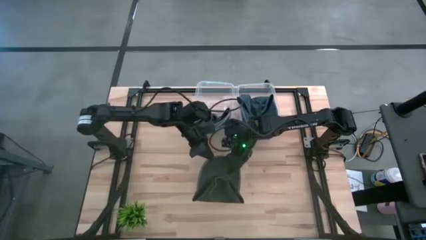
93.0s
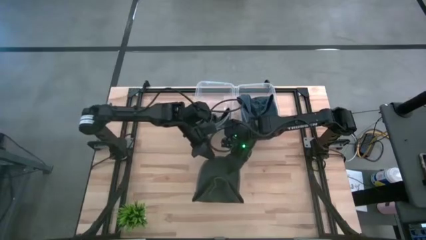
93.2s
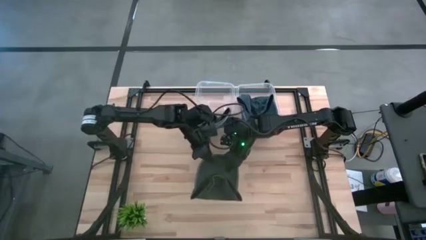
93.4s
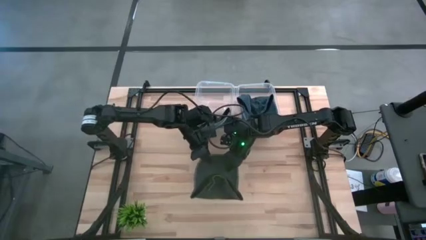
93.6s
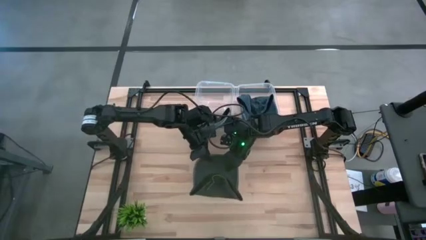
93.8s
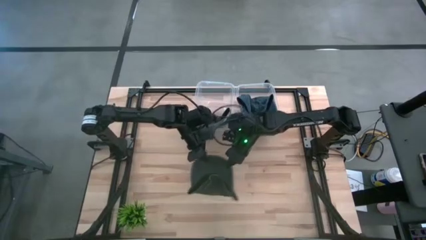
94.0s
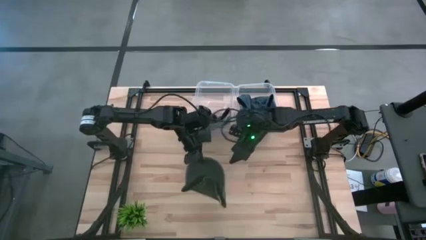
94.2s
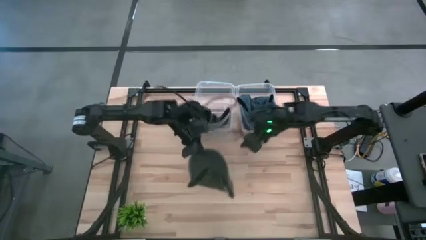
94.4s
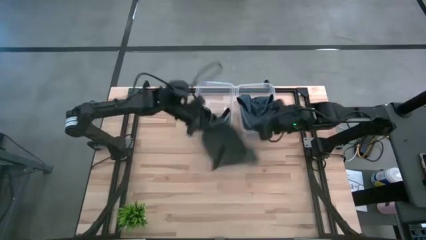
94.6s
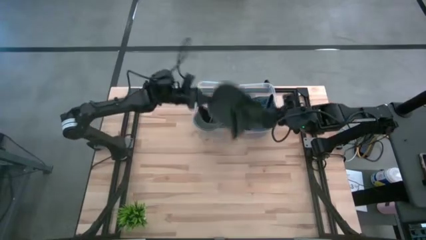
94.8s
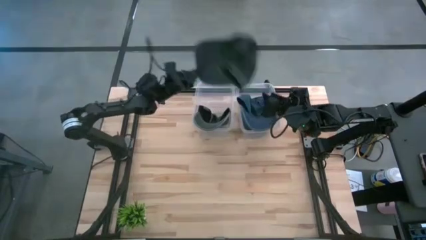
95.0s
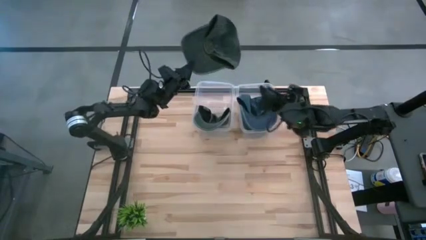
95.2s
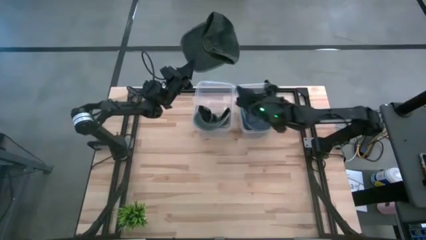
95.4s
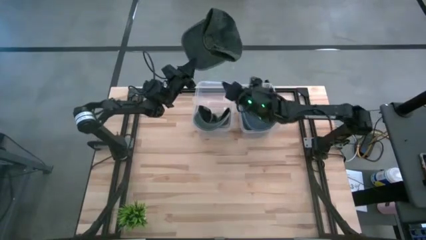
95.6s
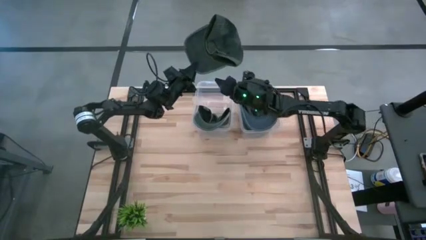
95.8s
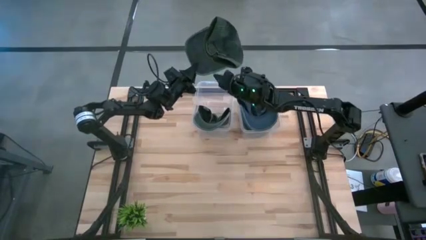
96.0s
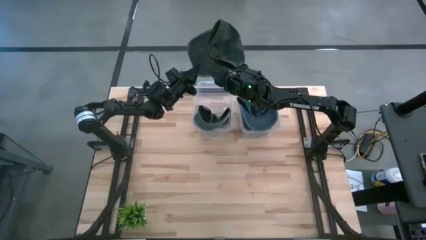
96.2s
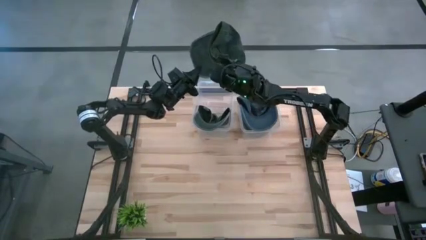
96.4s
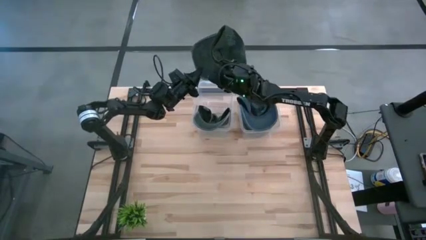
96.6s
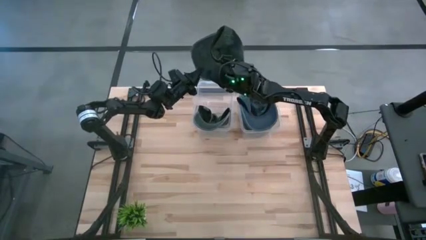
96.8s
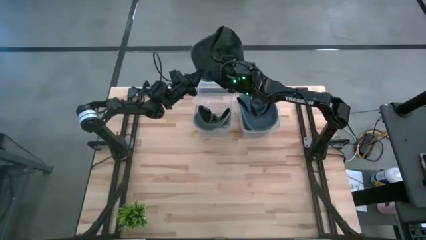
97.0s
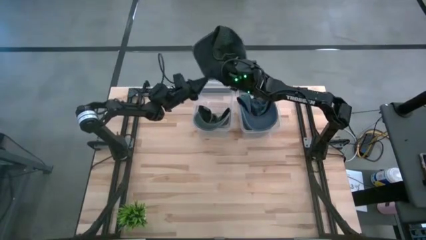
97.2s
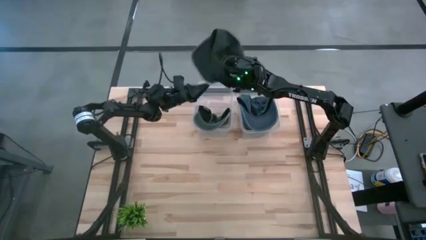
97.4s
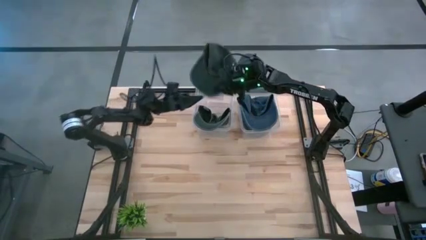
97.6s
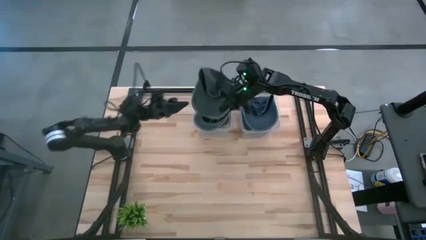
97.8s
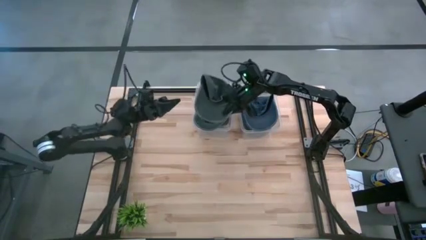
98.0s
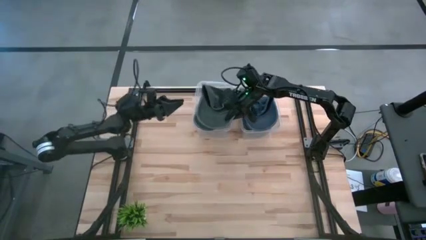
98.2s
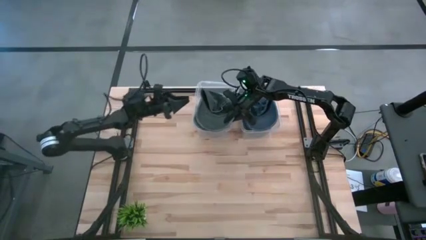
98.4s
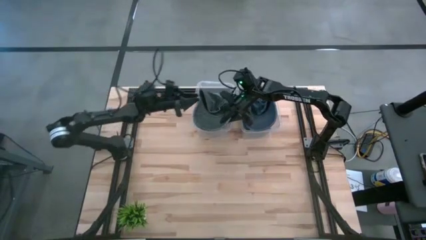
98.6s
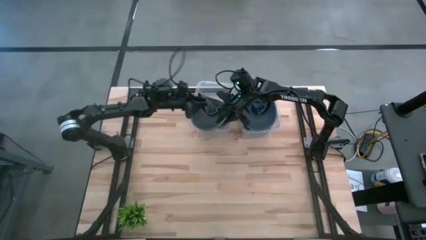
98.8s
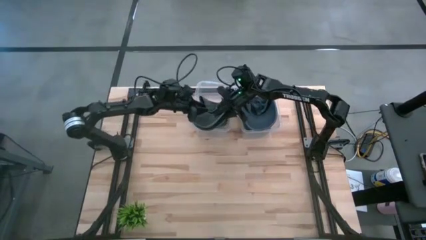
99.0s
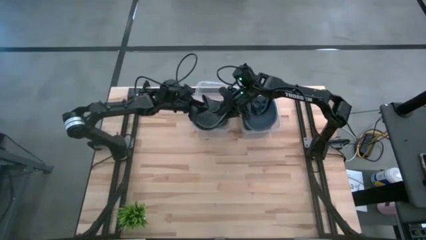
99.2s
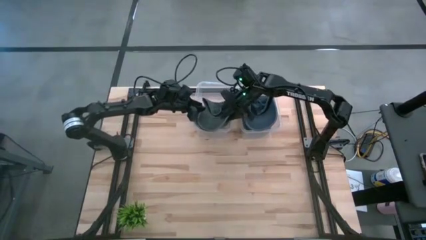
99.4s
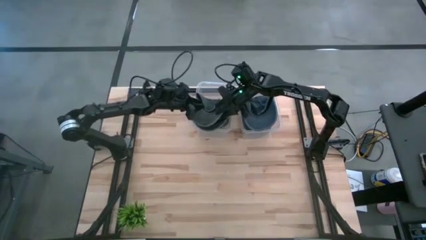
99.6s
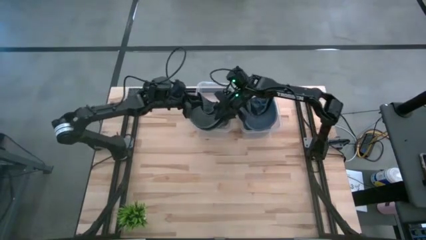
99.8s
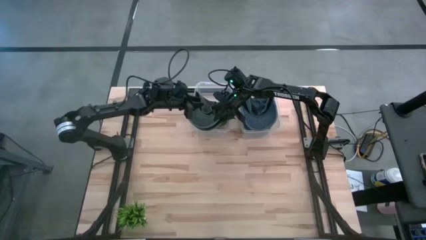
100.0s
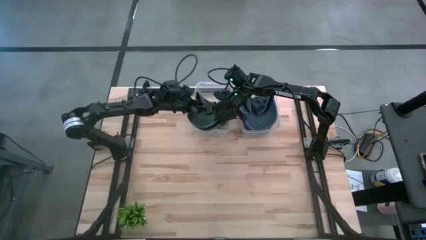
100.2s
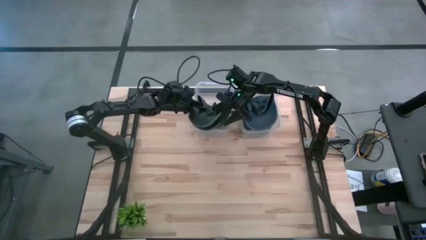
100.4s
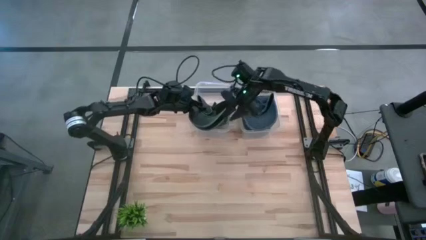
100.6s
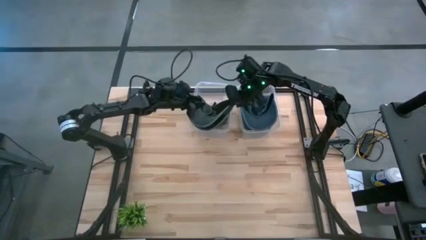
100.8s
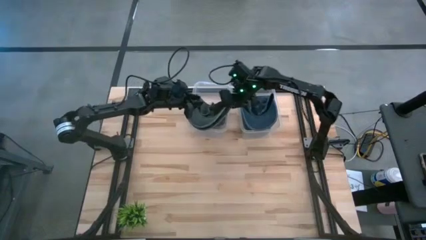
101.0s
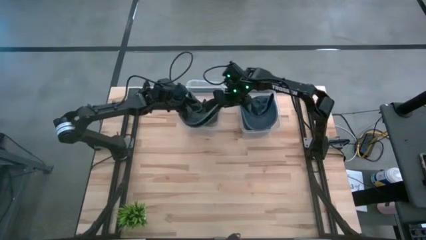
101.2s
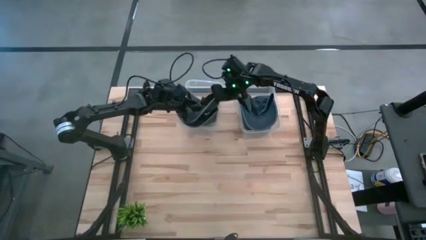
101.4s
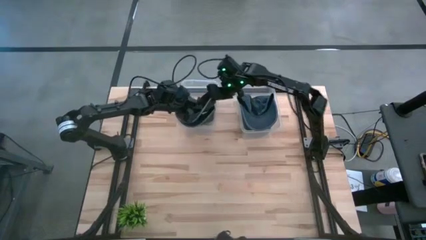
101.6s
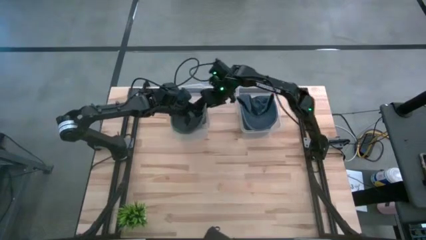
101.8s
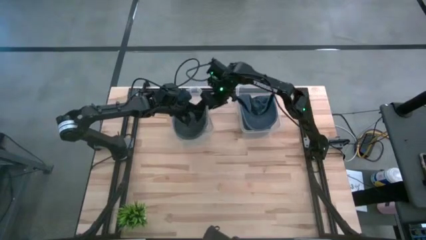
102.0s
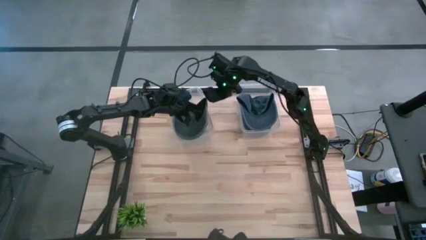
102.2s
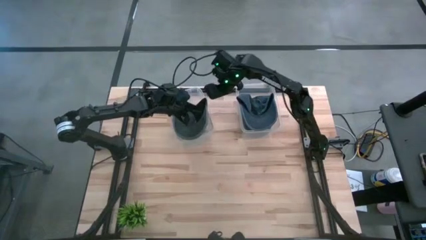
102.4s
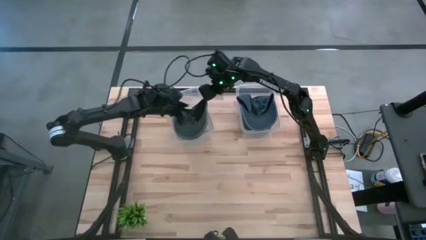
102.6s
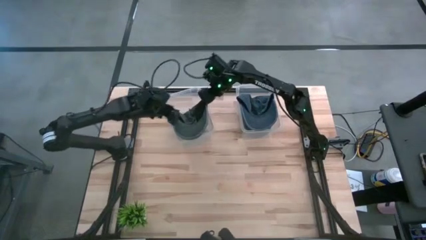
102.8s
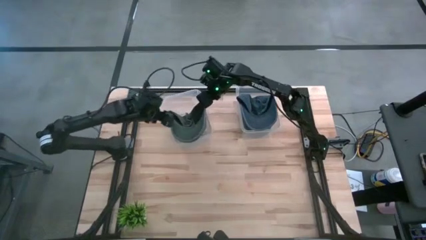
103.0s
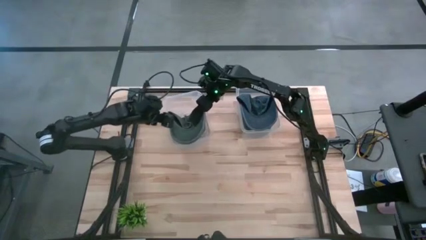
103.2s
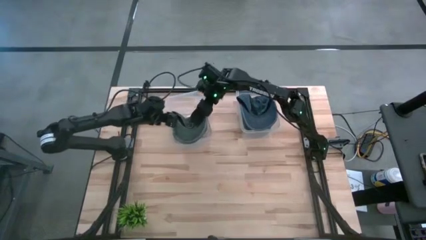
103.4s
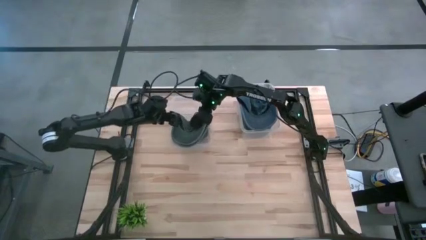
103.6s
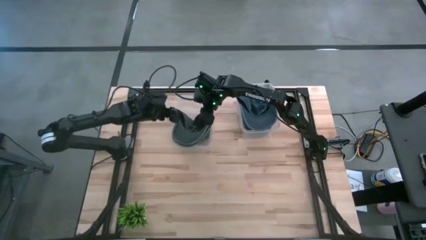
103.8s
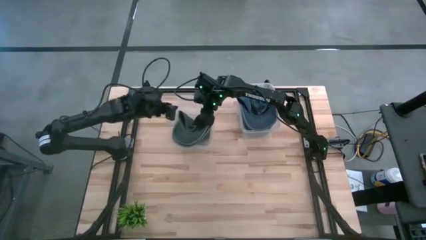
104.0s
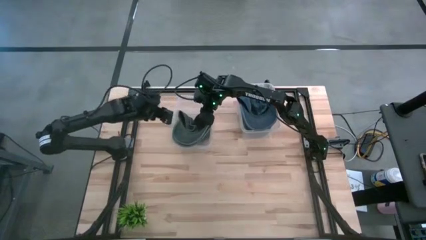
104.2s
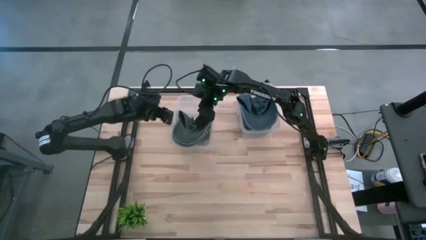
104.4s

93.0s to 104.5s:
Task: Pick & Place hat
Put the gray cap into the left transparent bin

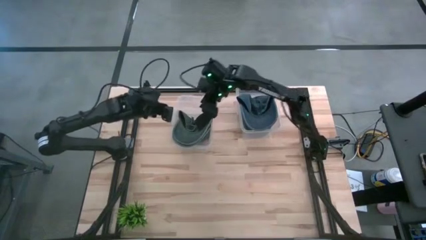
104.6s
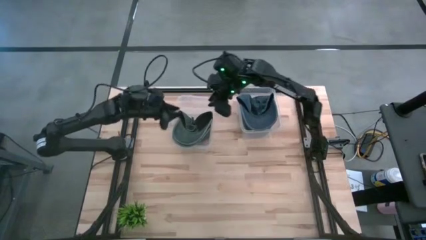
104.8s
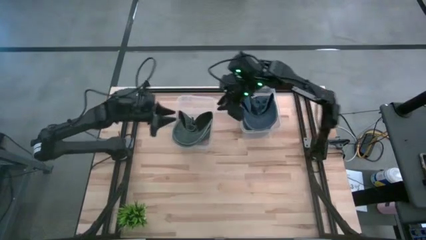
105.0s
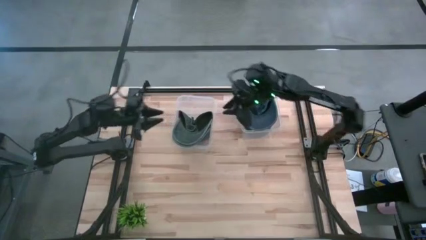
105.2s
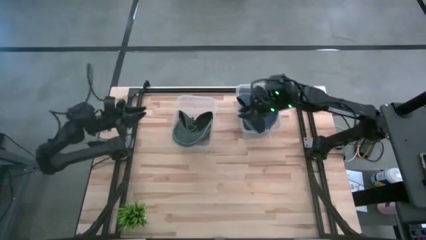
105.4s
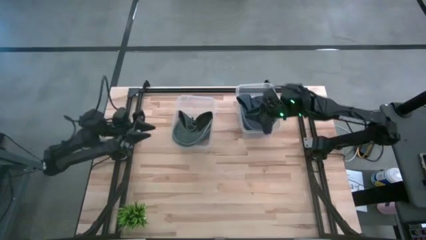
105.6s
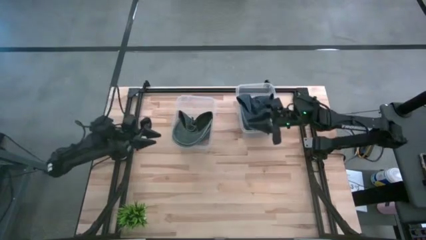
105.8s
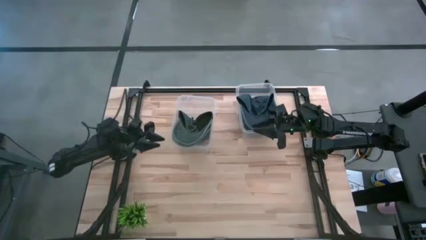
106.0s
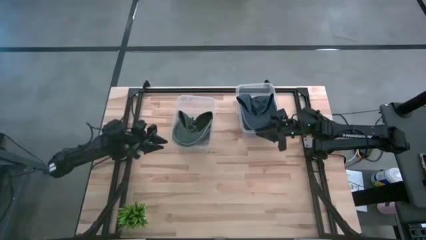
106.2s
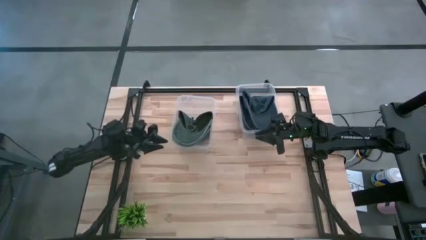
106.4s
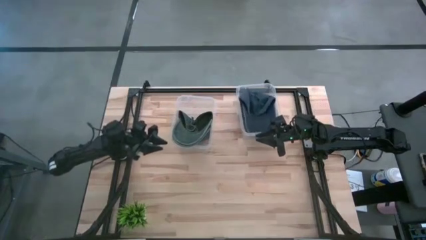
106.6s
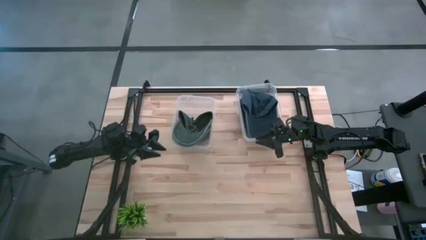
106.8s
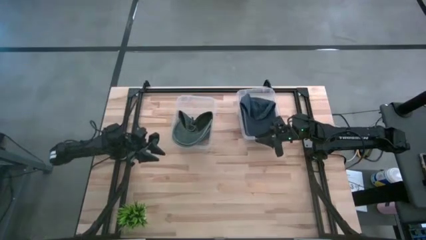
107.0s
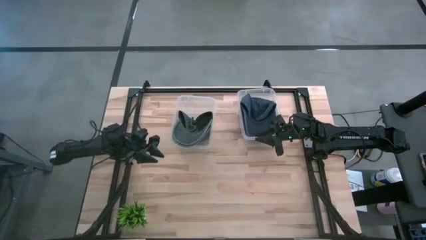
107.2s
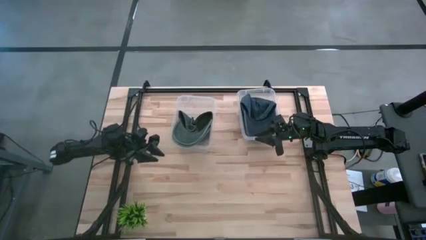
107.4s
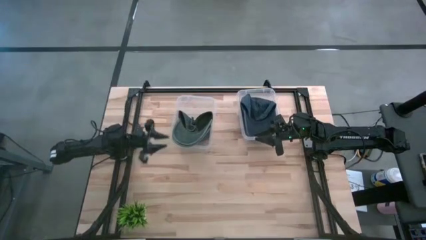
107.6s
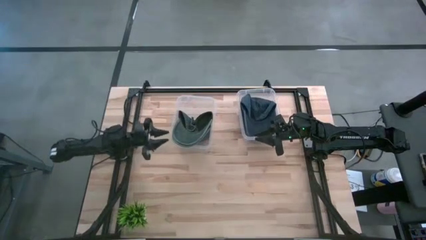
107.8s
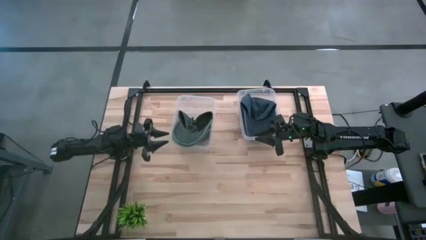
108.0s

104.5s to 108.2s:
Return to Home Position

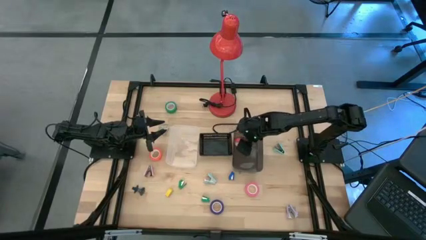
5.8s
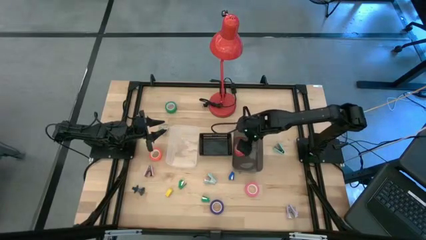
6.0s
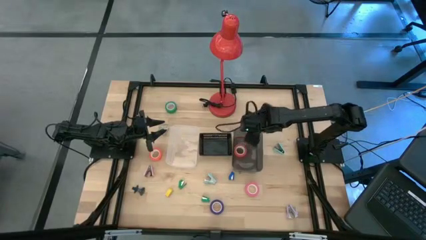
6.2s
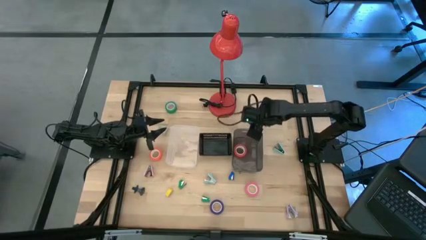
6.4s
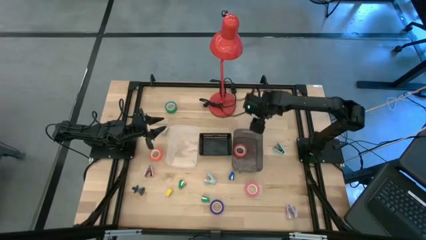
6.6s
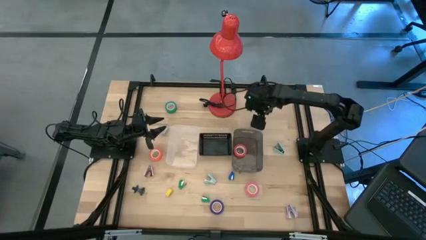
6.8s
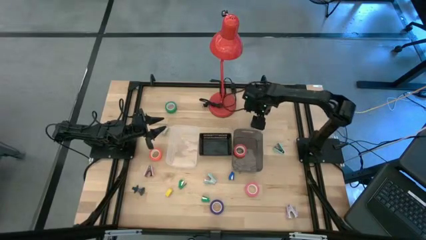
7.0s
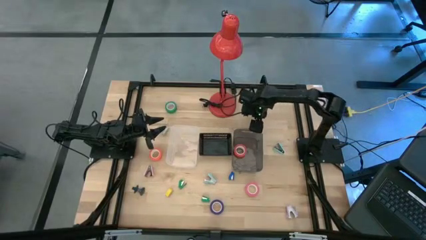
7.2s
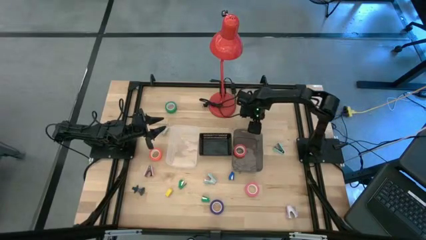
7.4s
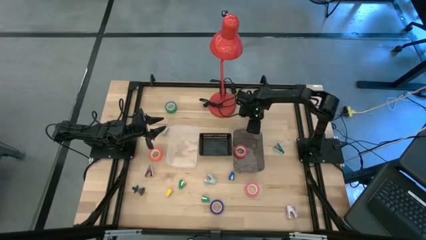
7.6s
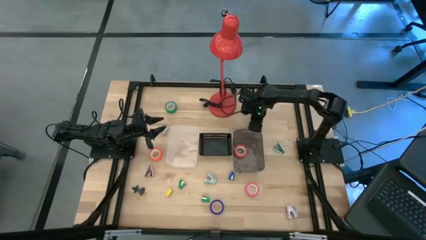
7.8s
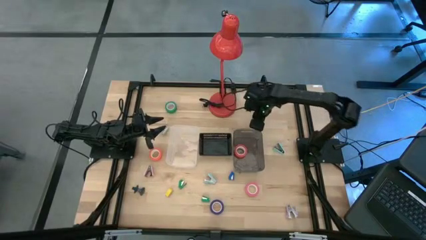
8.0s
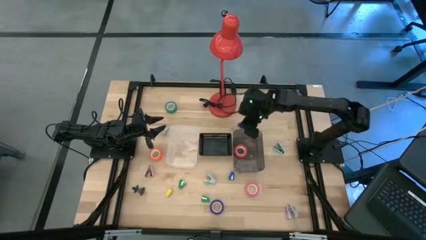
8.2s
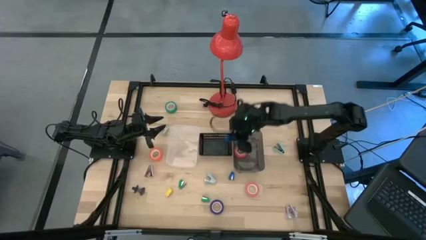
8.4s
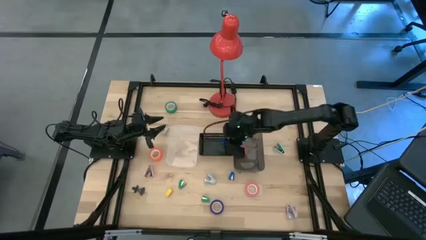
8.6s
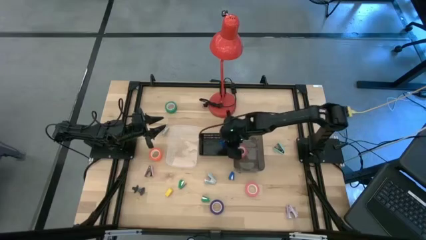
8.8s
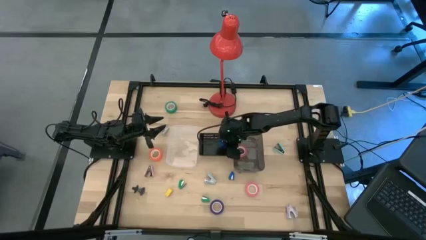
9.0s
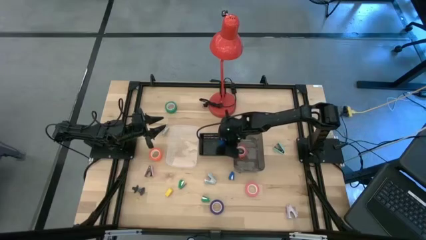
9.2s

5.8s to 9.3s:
Task: Pick and place Stapler, Stapler remover, tape
Put the top blue stapler into the black basket
